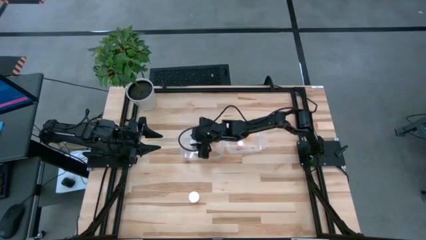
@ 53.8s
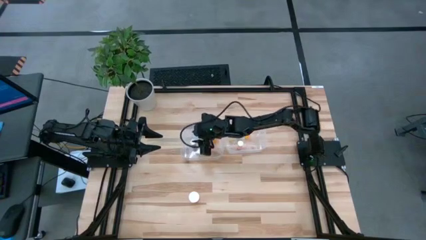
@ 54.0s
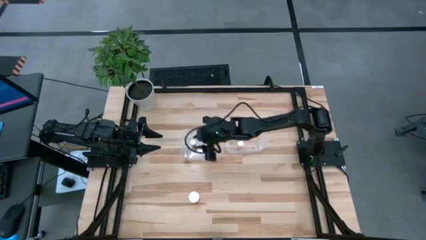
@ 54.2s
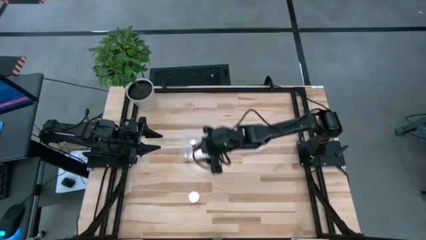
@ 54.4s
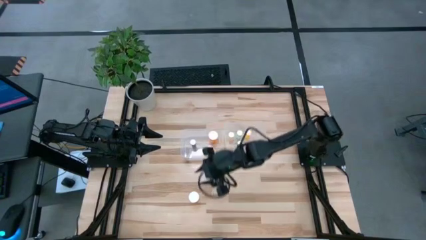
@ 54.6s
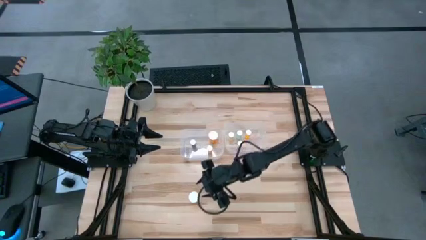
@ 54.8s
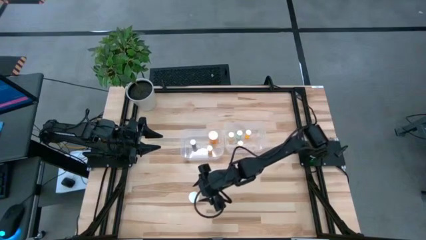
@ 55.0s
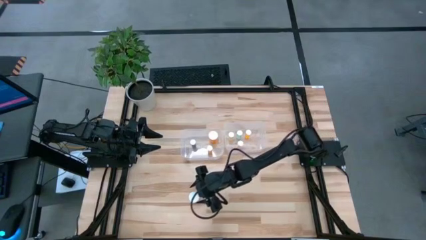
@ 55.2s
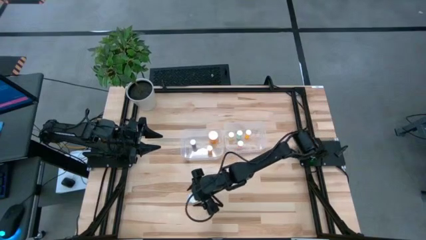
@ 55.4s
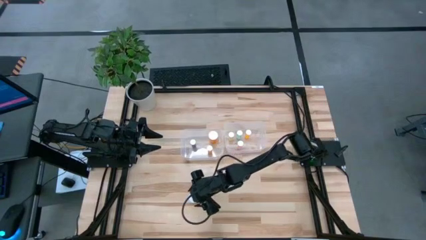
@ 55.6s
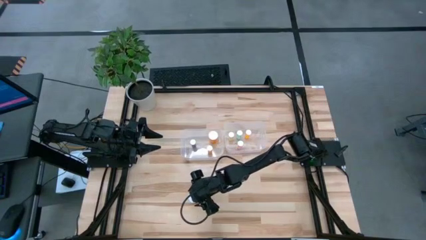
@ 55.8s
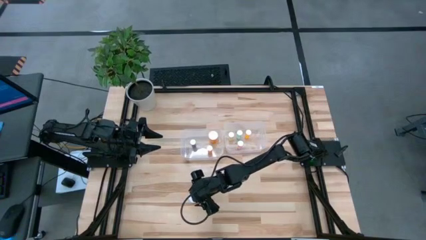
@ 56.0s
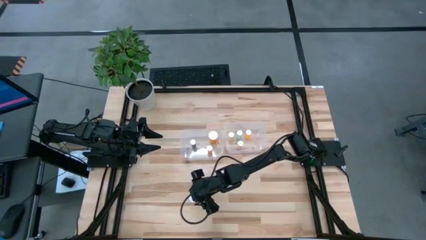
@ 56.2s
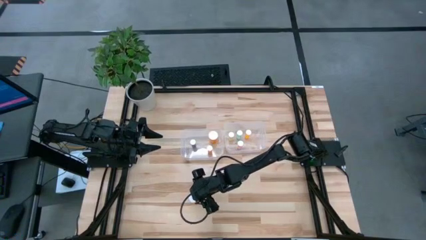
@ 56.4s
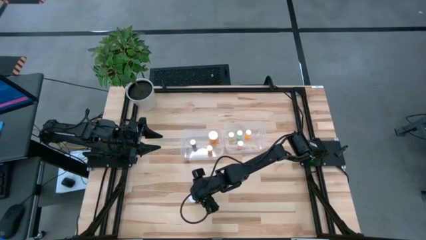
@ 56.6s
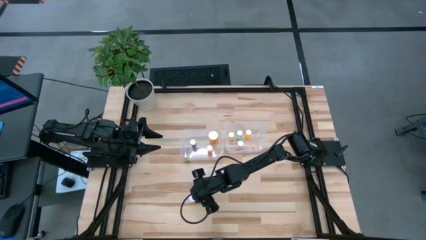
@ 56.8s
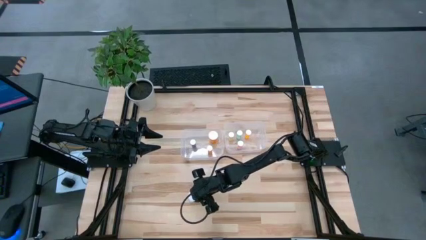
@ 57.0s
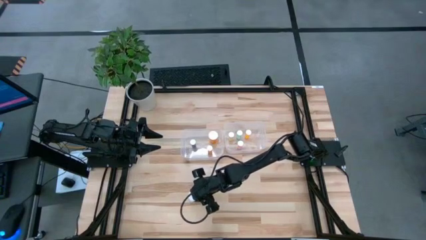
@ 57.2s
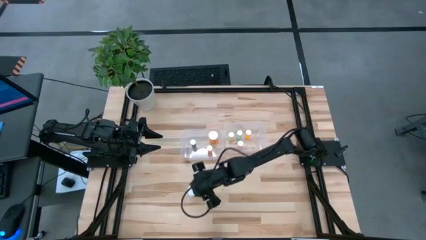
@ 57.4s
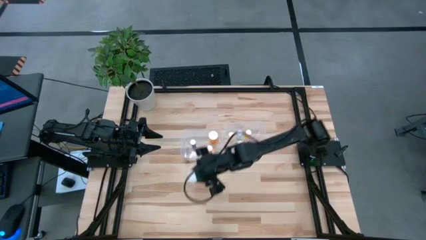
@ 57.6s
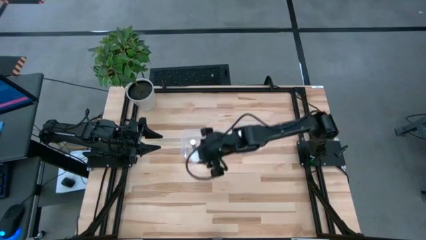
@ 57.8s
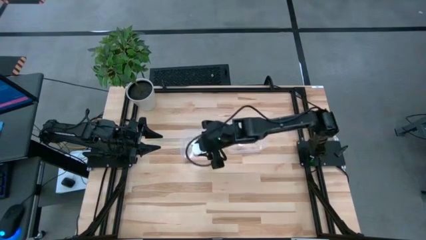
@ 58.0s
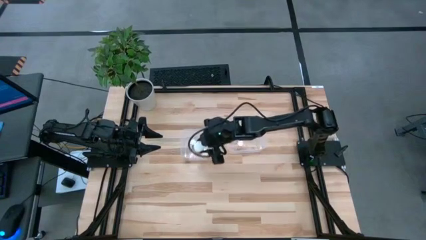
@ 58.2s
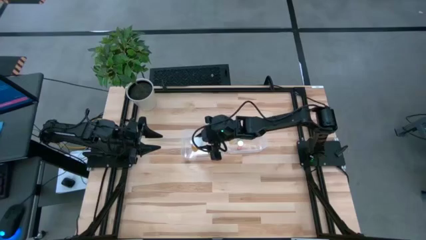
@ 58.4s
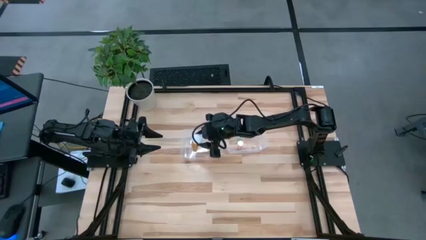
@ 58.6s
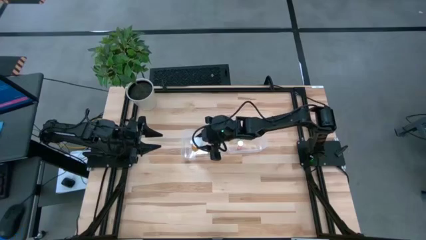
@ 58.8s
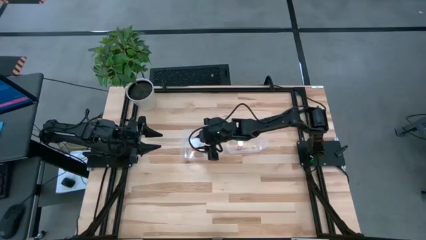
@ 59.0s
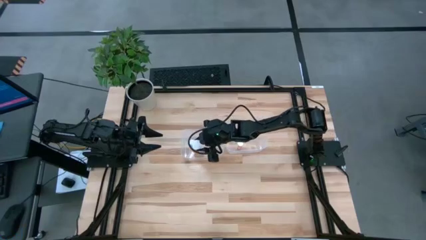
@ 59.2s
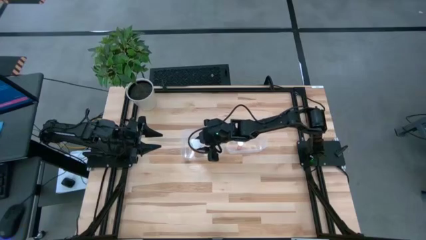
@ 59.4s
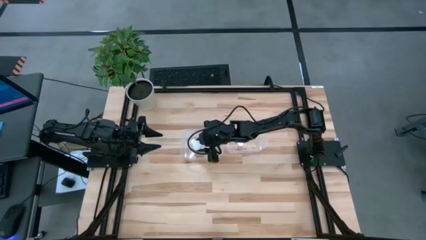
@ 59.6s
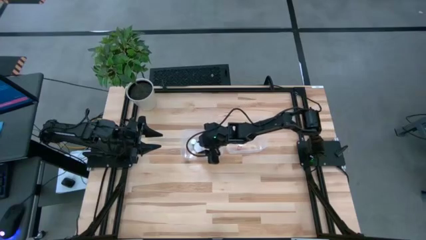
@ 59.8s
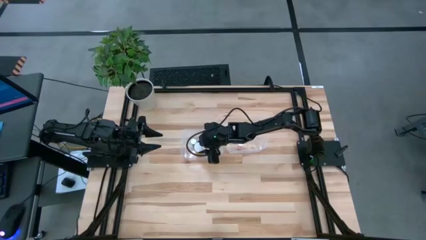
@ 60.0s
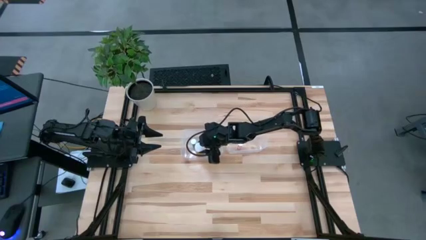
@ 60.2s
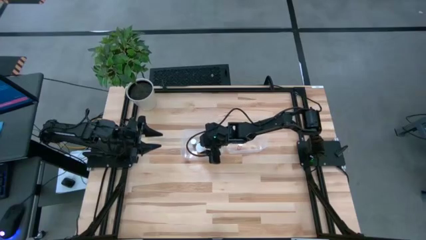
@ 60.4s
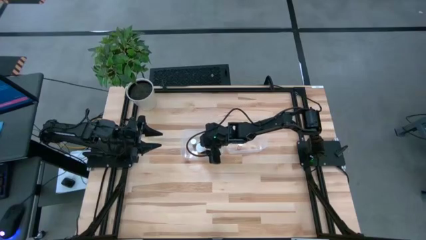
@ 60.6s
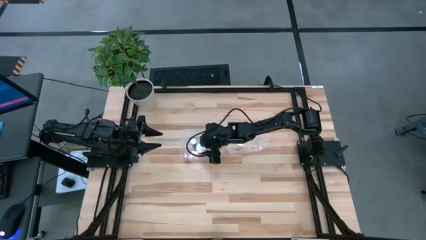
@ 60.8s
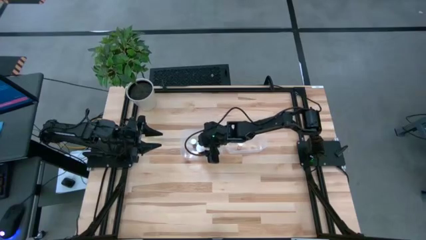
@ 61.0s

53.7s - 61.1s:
Task: Pick and place medicine bottles into bin by pill shape (circle, oval)
Put the big orange pill bottle into the left transparent bin

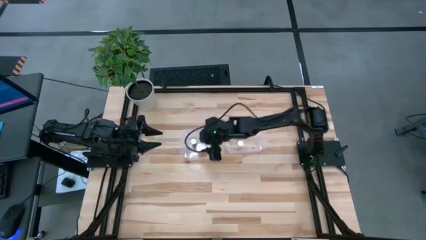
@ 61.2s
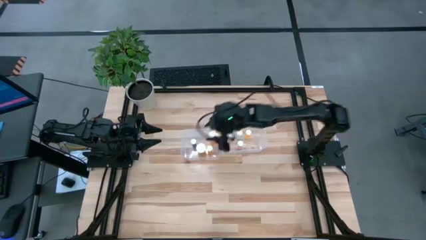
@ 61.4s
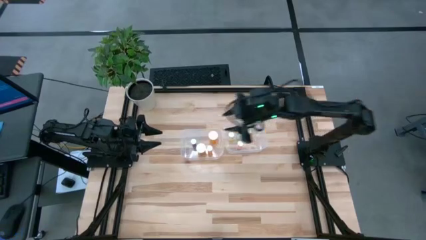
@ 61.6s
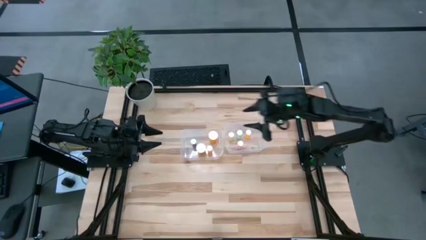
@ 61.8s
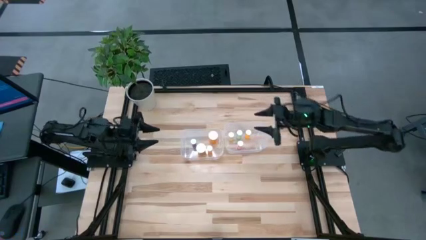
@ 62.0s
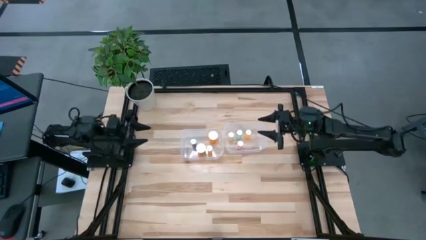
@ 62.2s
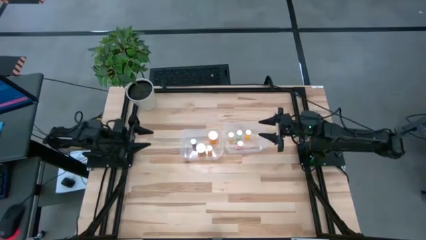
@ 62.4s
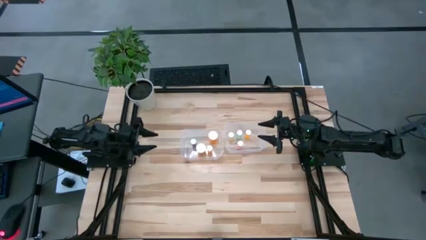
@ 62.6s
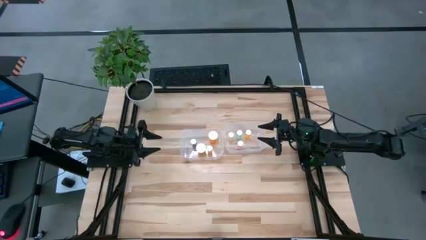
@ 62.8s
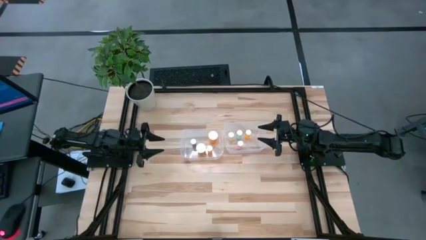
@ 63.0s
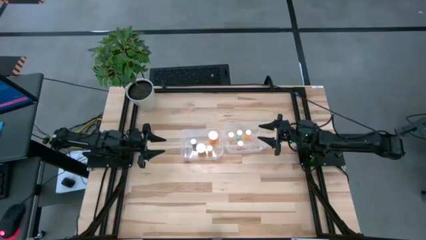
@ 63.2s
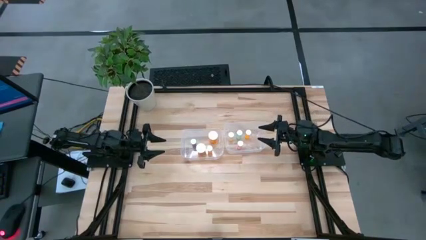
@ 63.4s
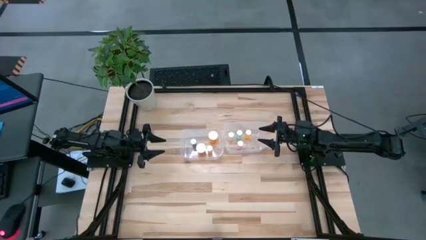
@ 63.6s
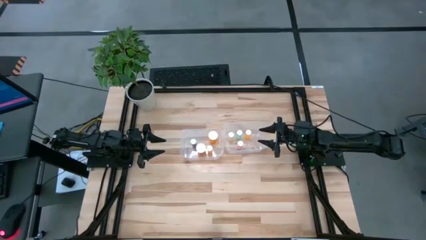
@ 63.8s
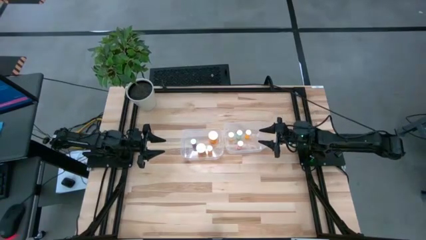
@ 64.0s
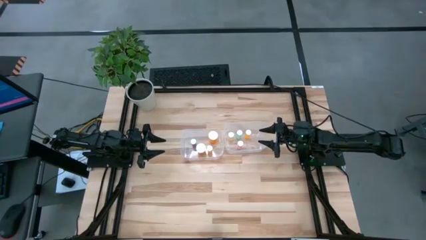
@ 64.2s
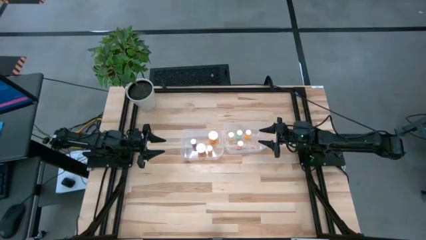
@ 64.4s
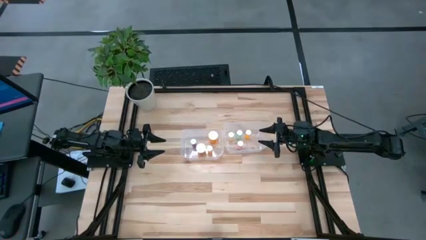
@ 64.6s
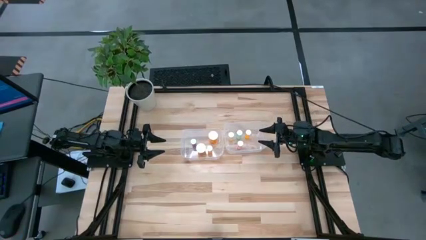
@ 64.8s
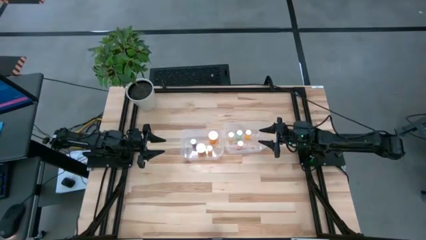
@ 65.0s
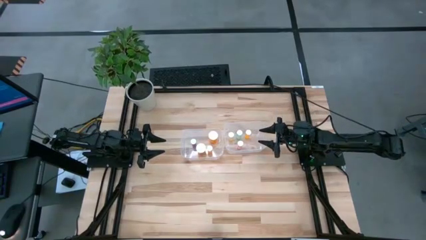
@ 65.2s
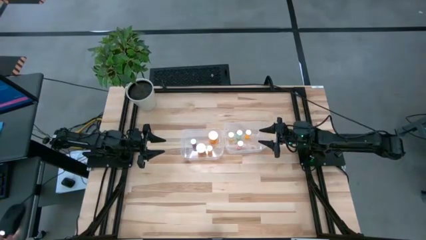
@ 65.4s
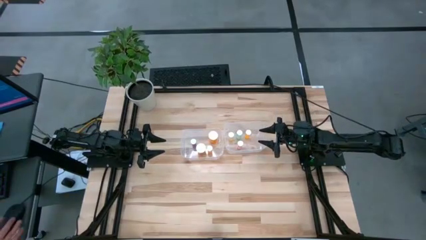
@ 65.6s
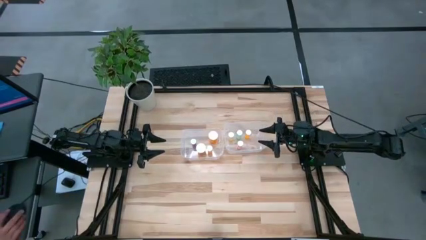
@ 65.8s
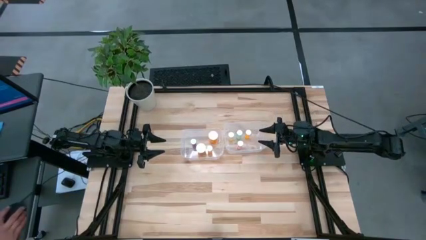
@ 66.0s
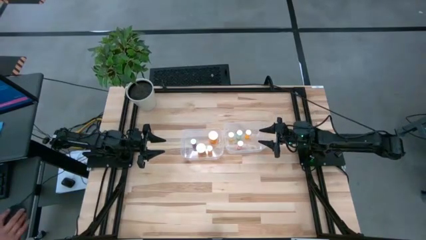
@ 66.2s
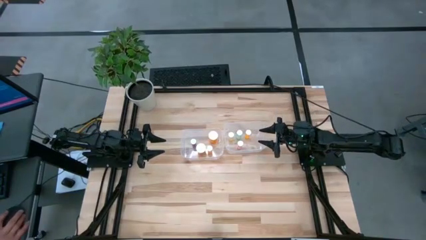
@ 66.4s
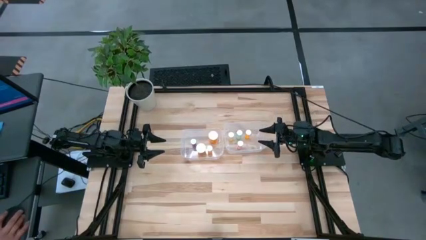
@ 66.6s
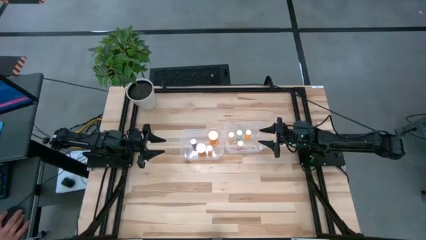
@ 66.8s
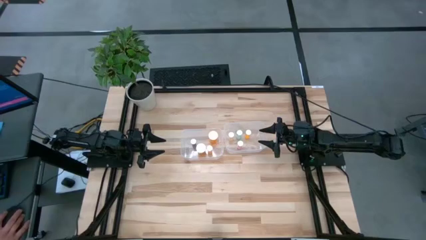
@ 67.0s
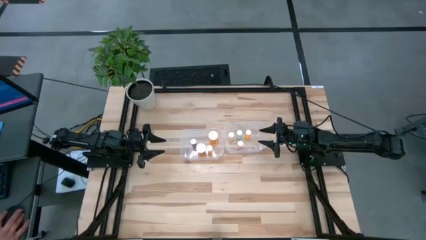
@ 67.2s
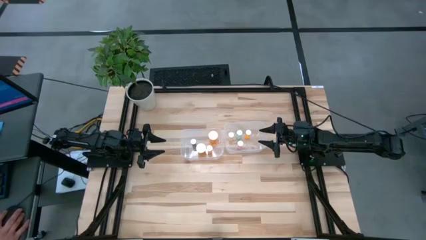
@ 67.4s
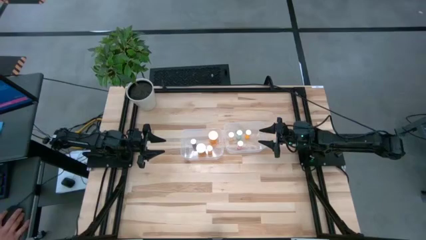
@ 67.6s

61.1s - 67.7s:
Return to Home Position

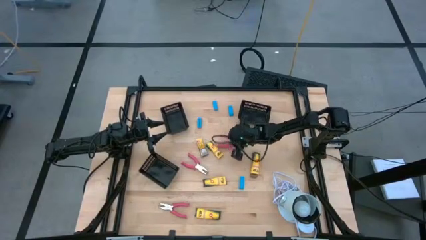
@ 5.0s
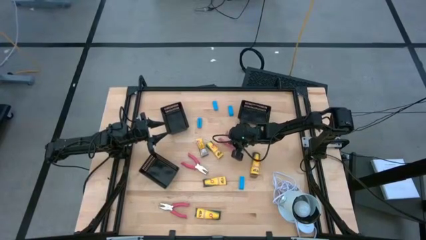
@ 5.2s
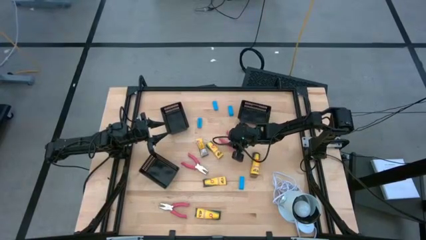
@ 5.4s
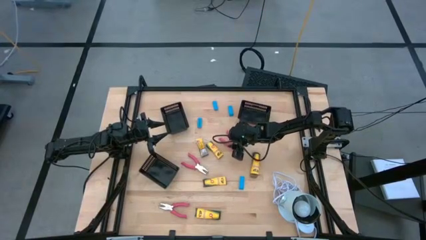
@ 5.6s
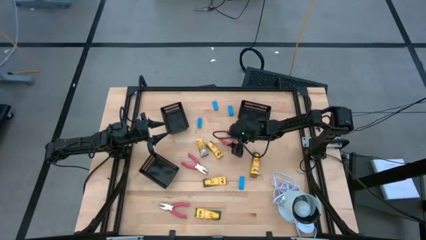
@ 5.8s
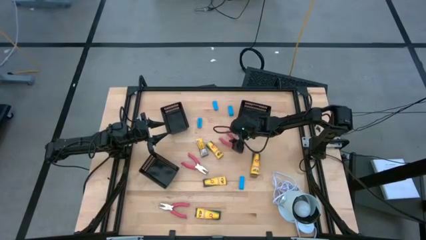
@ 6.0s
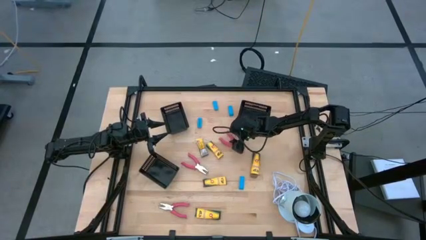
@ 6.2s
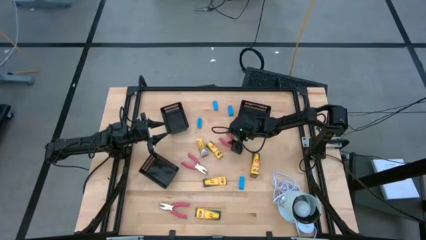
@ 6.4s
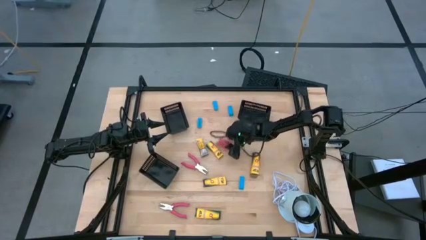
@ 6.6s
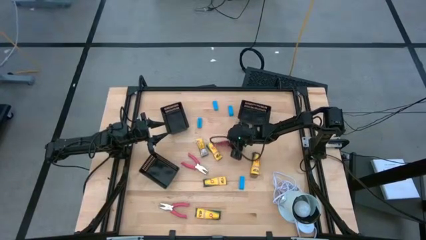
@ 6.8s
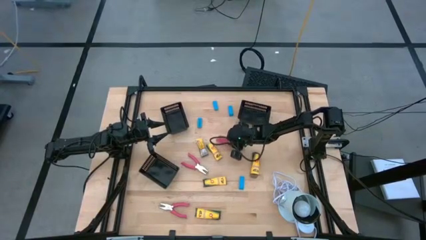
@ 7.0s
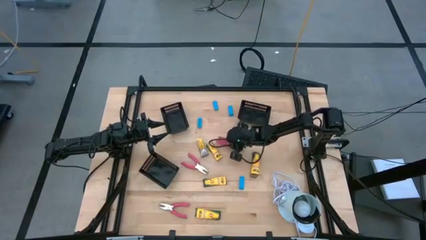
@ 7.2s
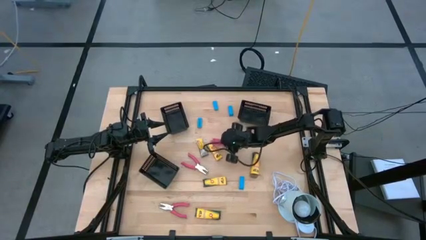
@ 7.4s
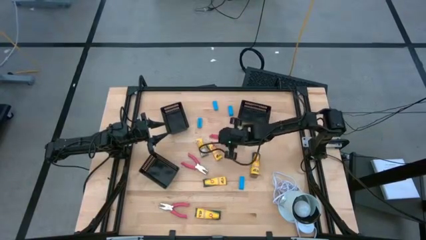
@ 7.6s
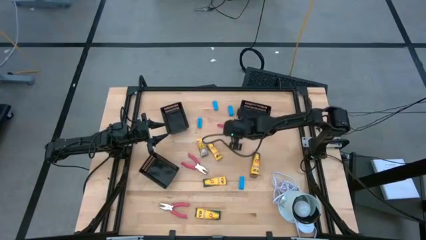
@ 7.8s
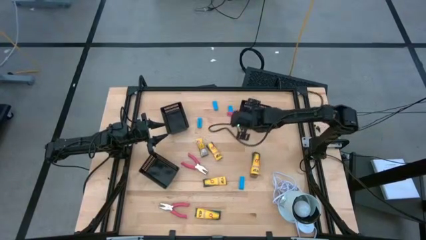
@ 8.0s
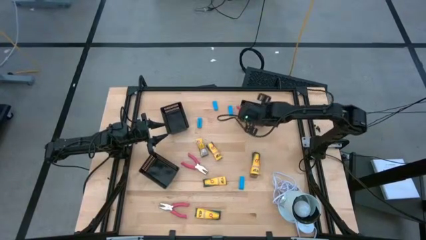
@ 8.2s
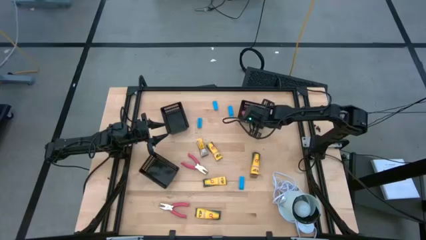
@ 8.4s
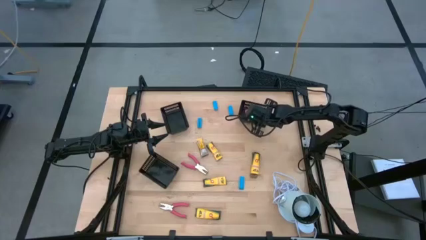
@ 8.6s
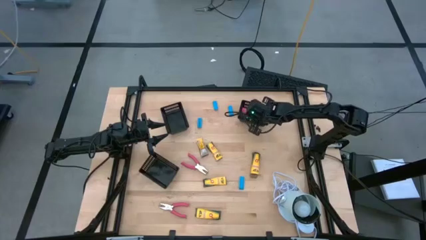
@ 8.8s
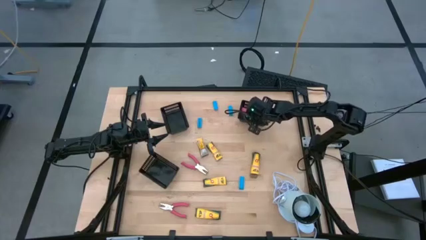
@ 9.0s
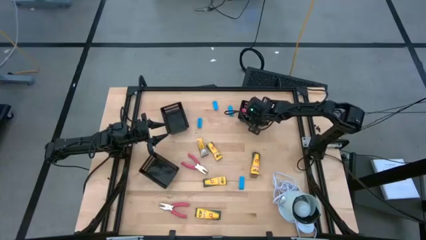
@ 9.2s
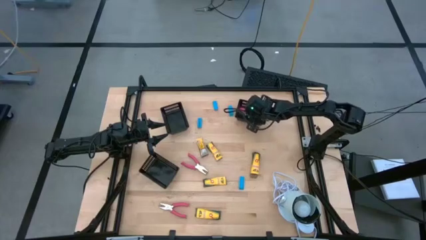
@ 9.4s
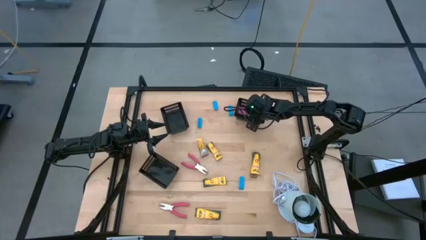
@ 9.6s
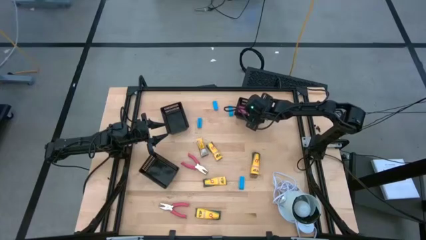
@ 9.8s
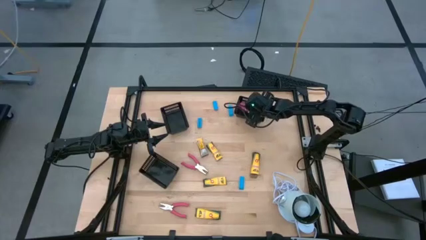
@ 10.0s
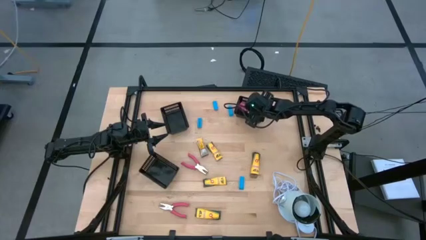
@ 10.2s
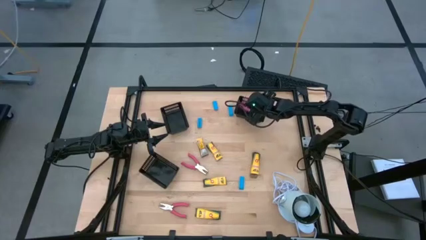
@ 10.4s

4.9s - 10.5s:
Task: Pick & Place School Supplies
Put the pink grommet eyelet pliers into the top right black bin
